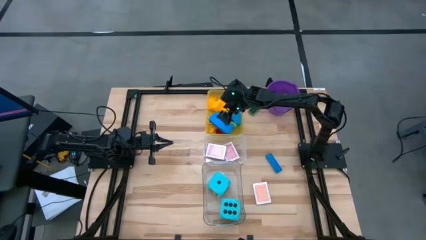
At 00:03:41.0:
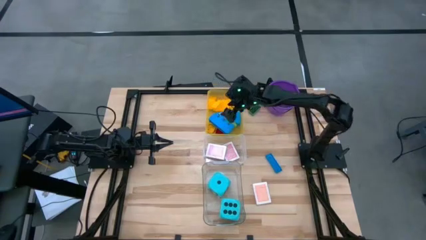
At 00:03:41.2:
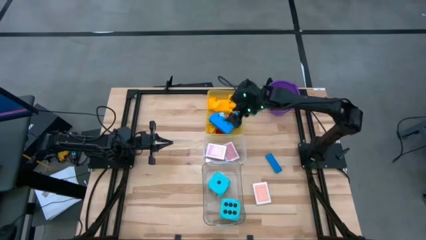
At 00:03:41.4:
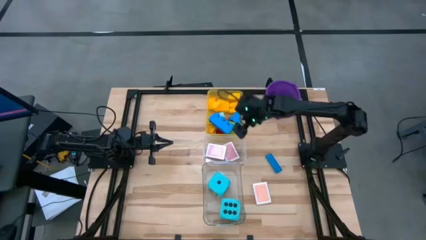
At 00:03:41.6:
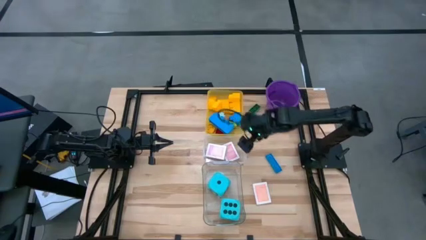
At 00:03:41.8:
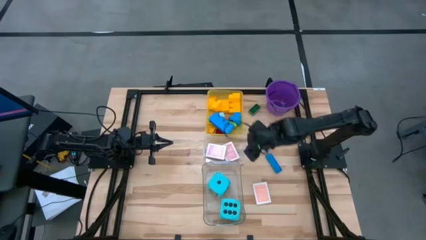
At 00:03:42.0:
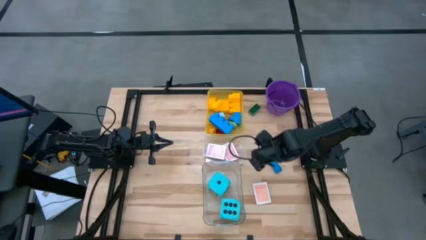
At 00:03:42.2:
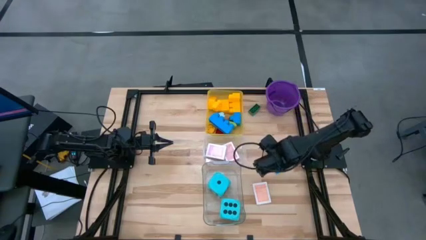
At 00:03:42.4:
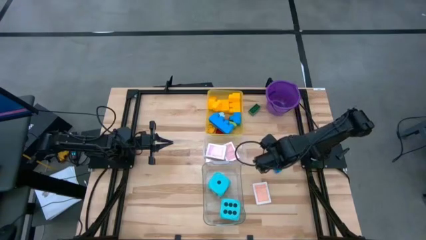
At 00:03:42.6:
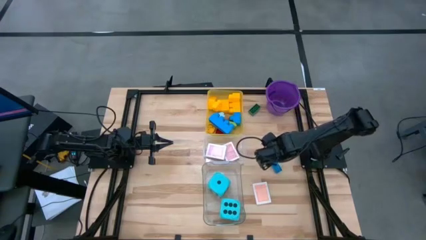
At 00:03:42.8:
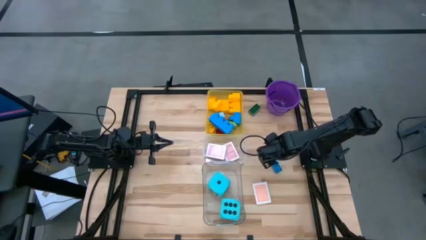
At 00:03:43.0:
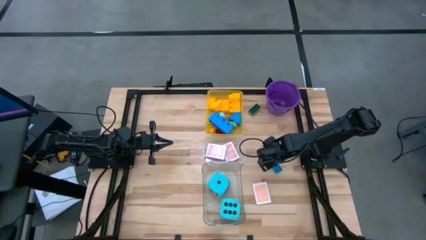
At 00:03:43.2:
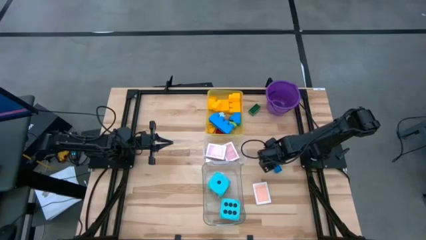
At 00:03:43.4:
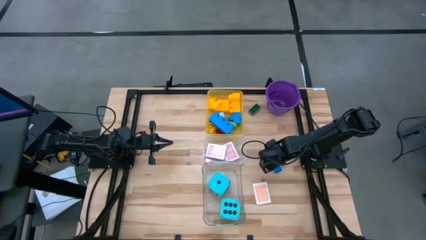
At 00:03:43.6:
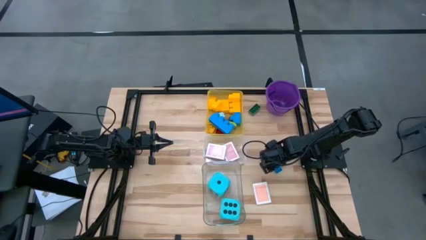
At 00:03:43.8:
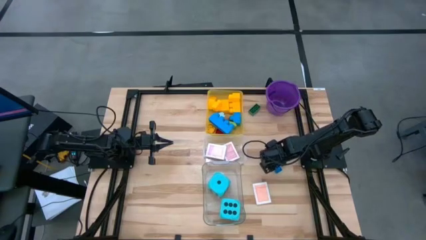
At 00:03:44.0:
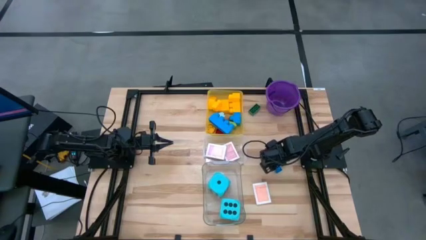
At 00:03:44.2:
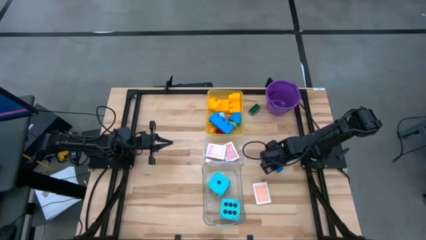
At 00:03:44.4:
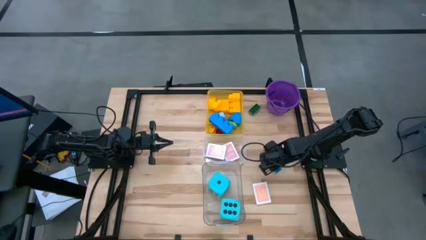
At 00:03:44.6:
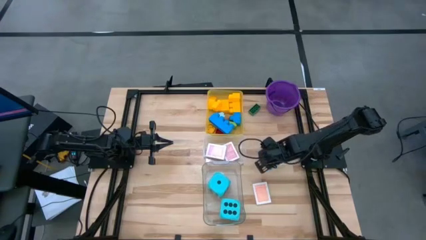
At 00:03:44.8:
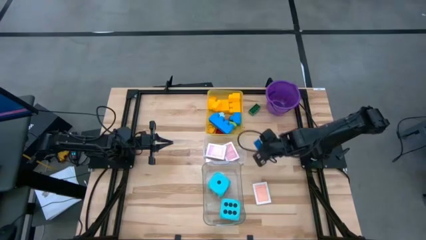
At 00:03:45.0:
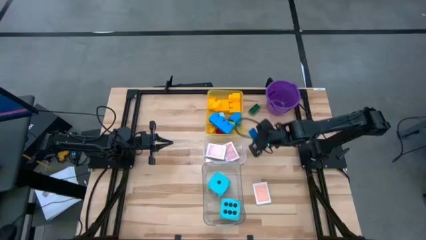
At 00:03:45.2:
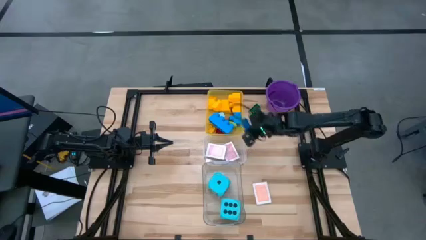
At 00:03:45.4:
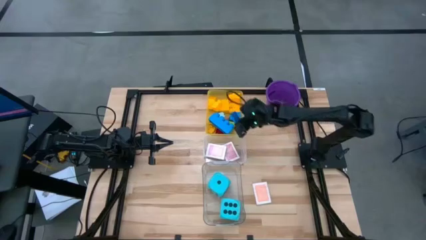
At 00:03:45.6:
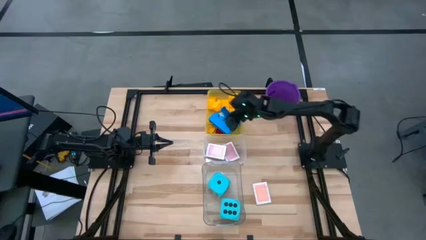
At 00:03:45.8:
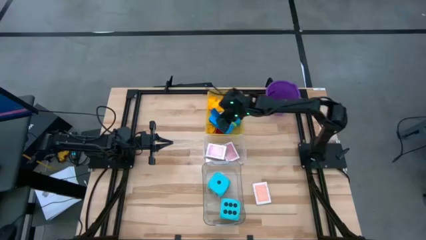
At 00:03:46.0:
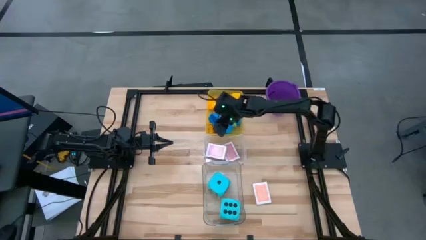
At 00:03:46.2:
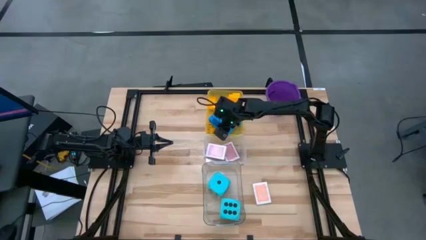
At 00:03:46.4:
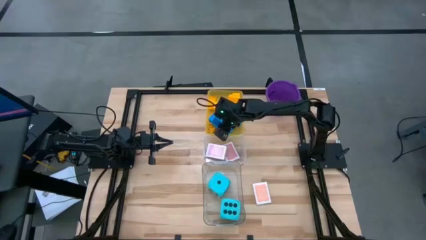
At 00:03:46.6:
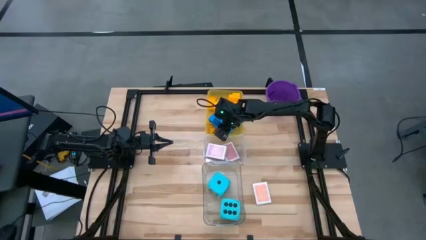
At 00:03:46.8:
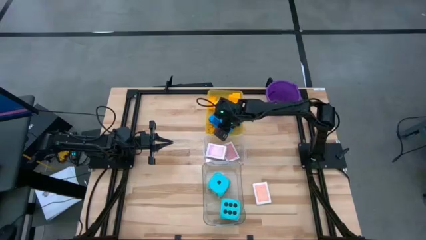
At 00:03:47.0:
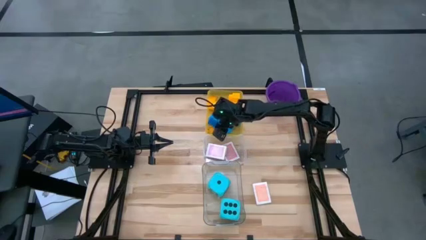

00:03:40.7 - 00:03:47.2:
Task: Pick & Place Toys
Put the blue game piece into the yellow bin

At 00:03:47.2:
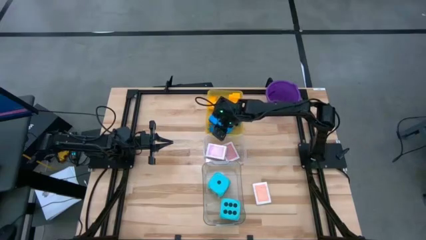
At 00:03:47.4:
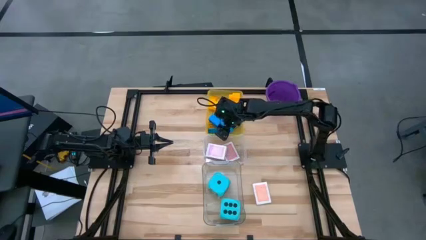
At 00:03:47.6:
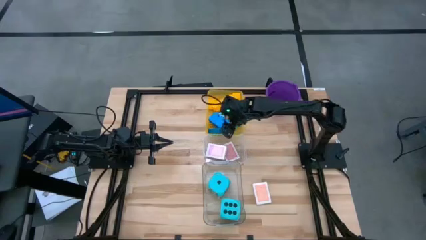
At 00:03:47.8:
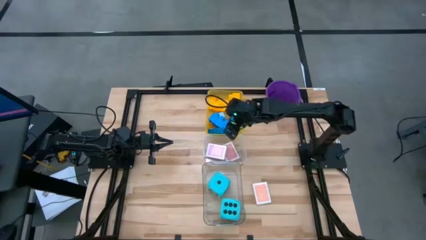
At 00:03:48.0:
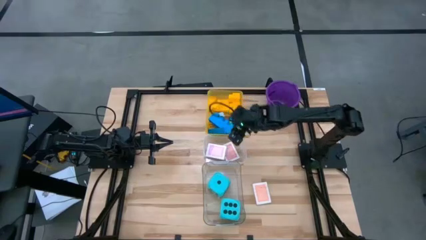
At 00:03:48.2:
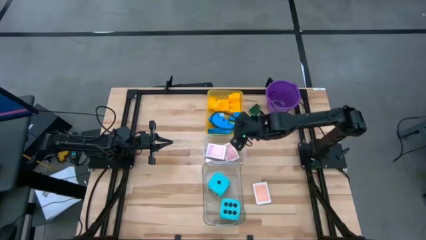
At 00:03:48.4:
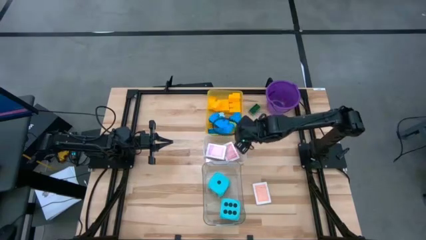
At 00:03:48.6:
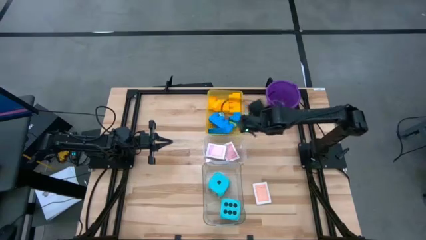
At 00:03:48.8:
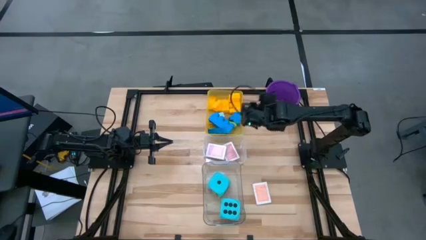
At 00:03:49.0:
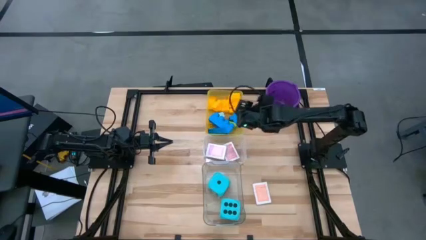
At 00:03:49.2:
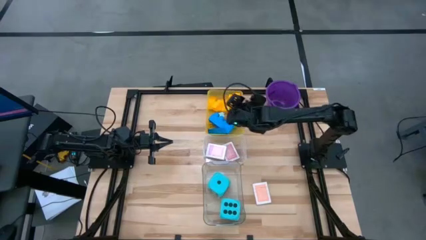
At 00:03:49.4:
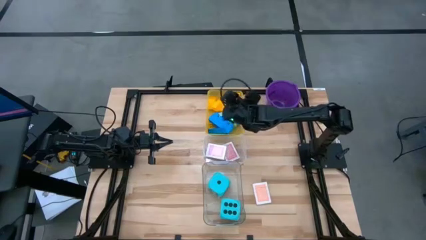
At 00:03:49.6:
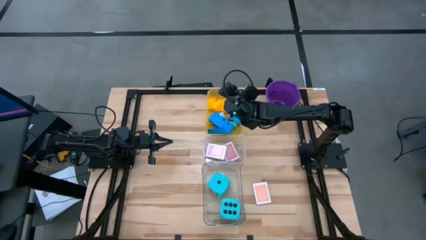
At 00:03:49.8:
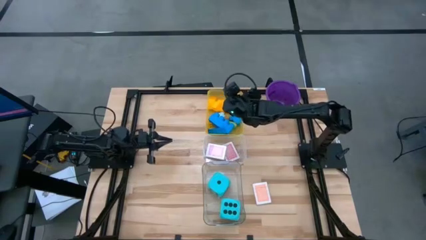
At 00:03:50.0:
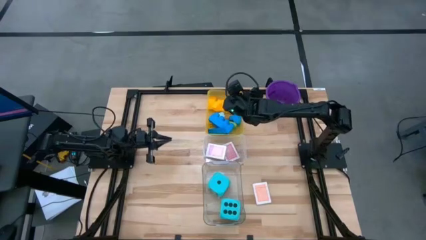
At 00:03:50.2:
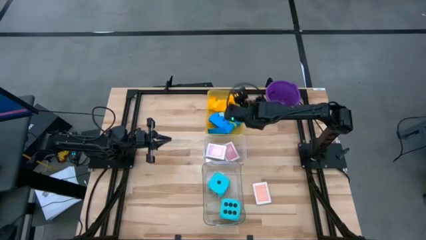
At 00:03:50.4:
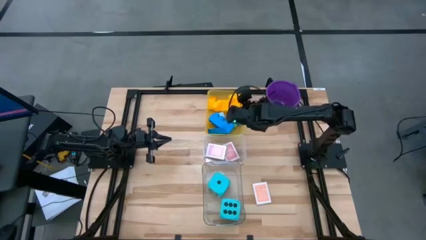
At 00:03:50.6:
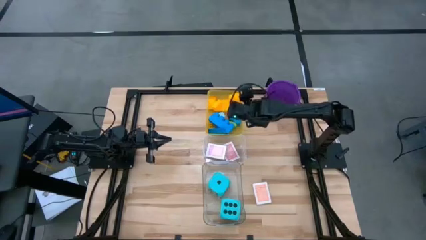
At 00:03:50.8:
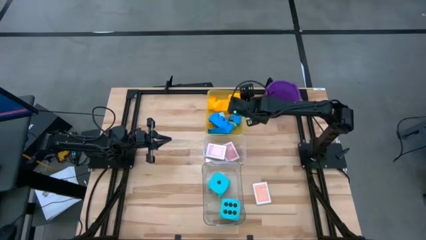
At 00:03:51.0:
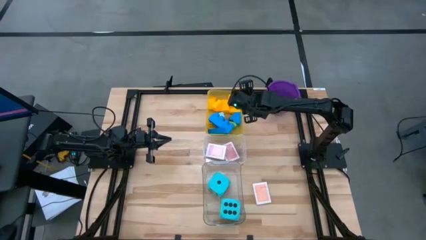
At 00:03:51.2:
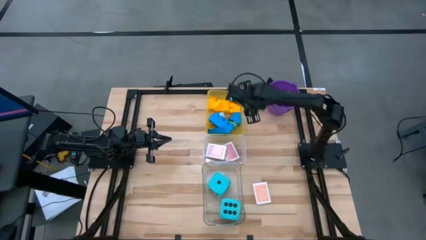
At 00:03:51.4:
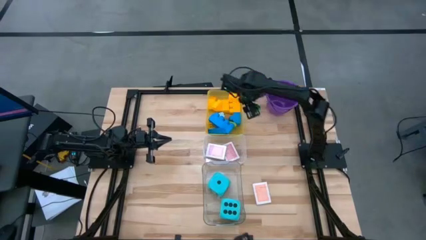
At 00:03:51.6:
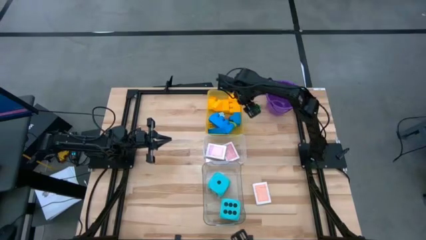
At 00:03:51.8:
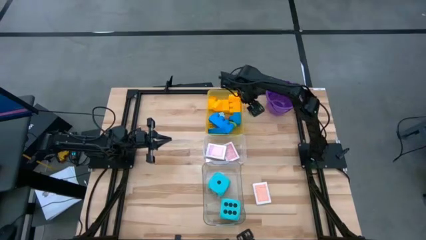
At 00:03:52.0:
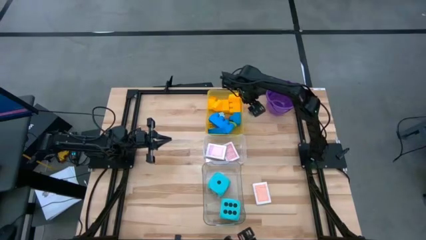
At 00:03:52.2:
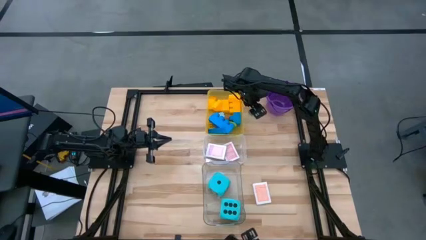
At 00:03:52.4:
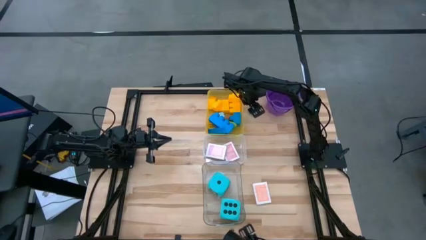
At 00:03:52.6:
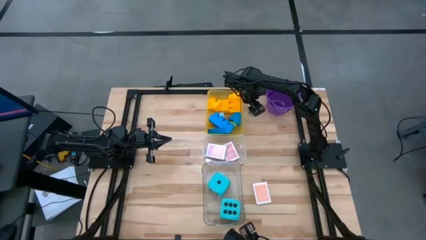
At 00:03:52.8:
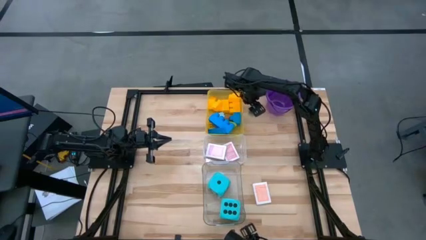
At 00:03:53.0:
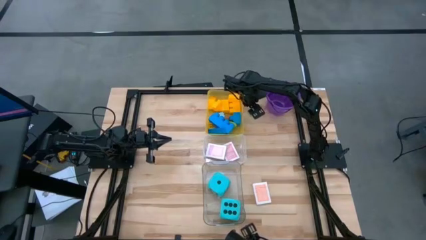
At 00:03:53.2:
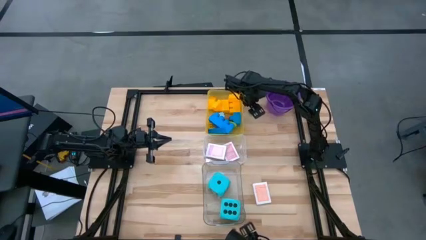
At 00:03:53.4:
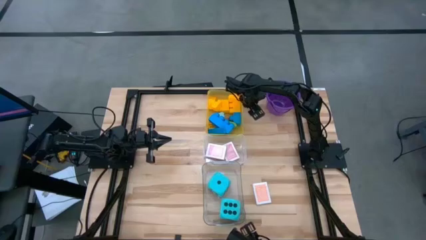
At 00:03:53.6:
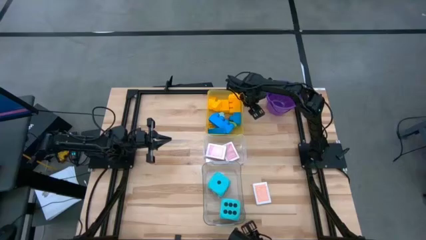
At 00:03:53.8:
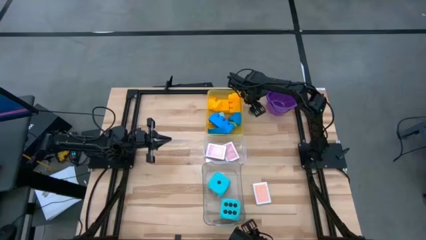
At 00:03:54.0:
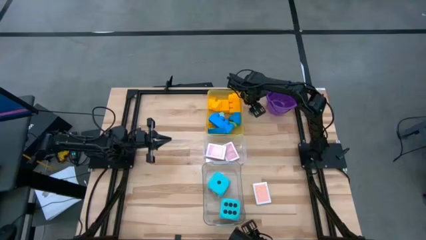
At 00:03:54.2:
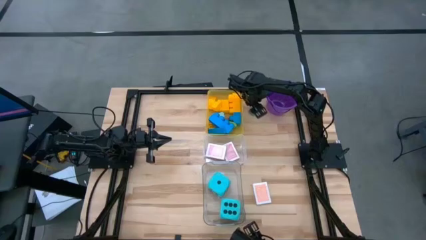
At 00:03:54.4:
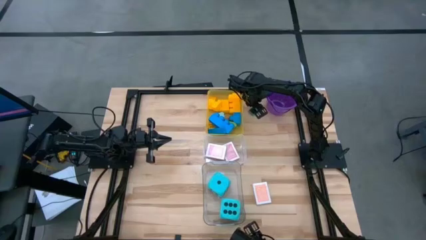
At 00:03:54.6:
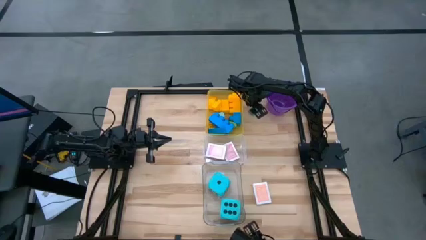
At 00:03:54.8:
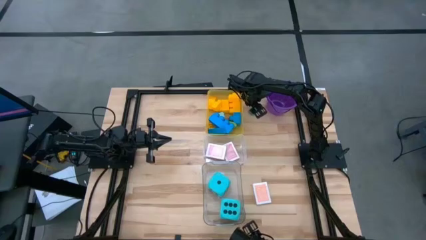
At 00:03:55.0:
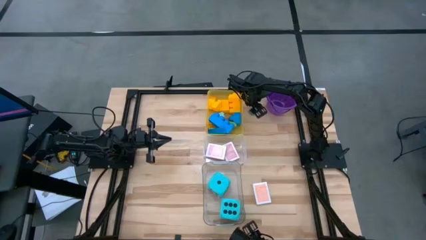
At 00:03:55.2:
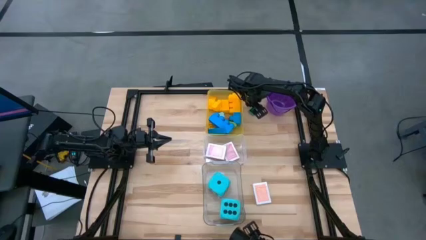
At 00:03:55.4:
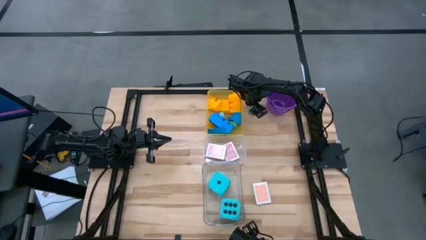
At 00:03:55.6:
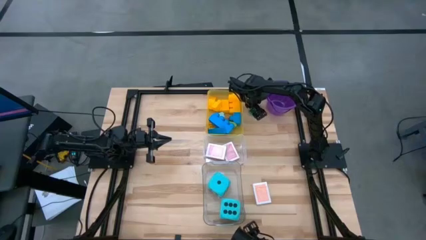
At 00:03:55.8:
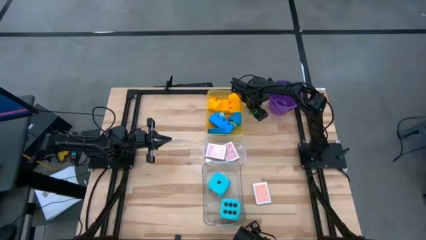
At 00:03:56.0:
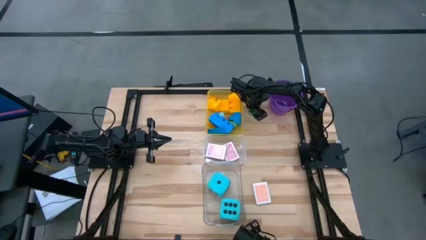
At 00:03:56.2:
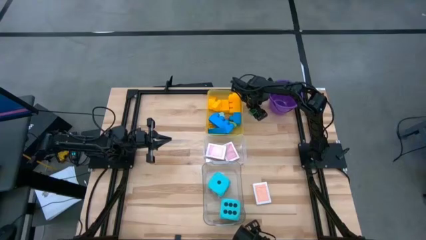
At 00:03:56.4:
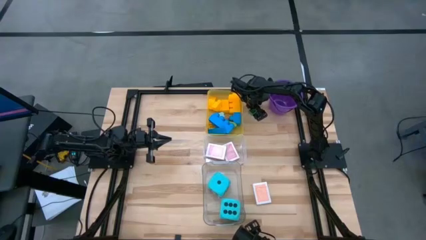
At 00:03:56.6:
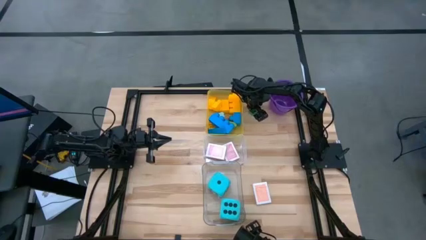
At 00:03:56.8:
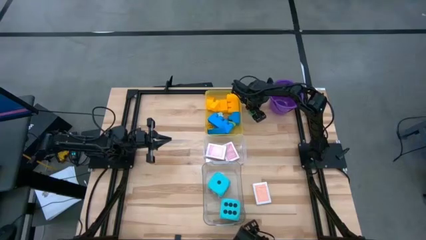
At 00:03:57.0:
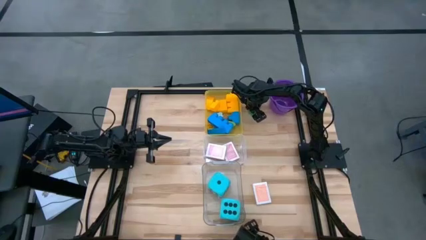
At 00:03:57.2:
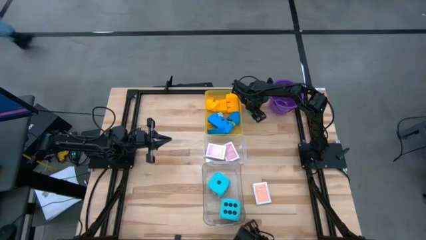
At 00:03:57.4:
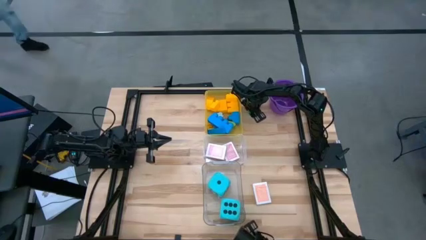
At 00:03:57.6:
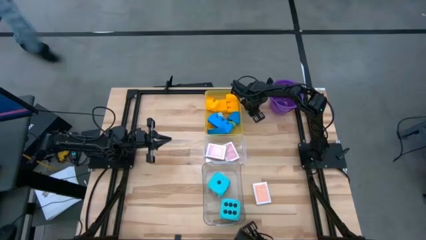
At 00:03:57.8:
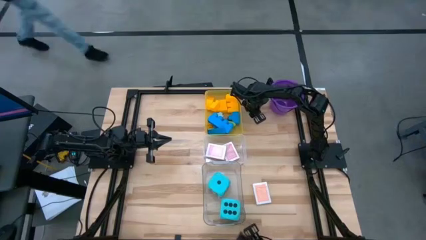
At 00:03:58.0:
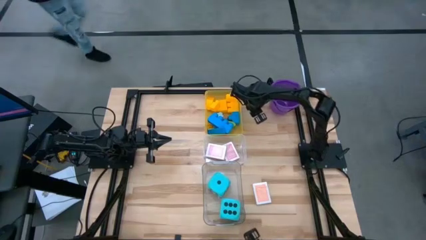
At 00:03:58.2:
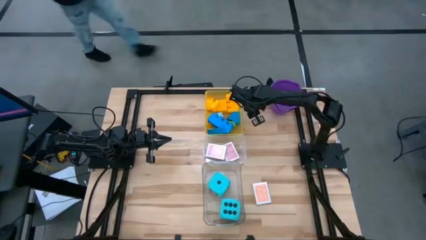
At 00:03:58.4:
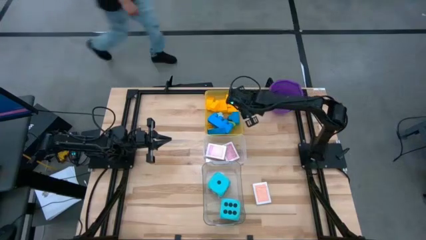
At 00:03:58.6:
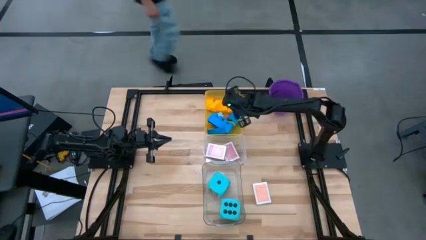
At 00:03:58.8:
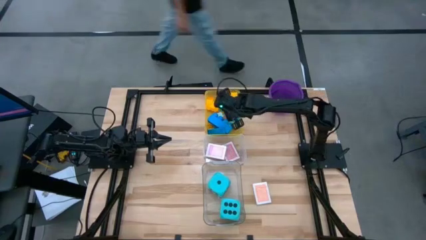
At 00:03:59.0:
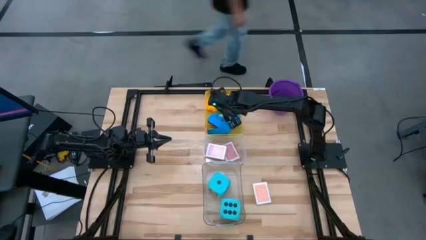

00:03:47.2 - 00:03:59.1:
Put the green game piece into the yellow bin
